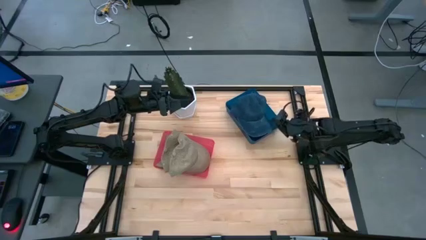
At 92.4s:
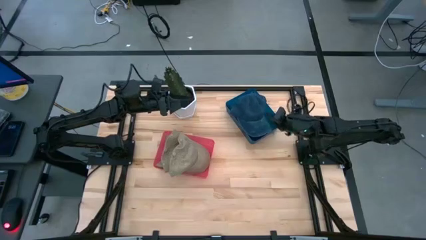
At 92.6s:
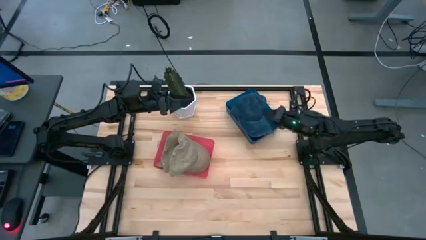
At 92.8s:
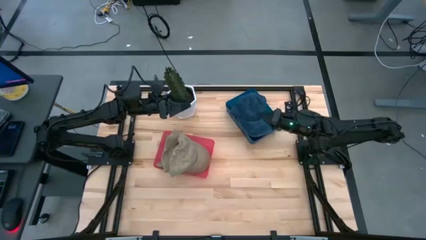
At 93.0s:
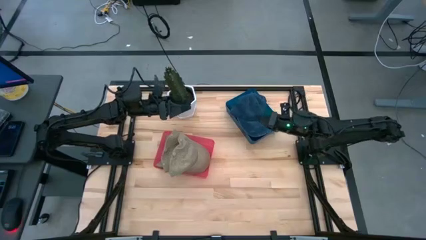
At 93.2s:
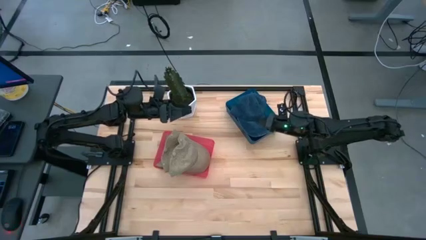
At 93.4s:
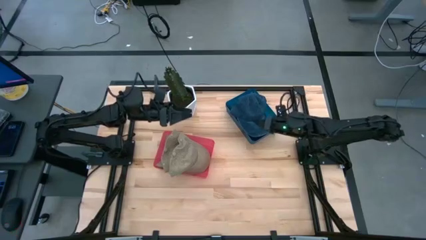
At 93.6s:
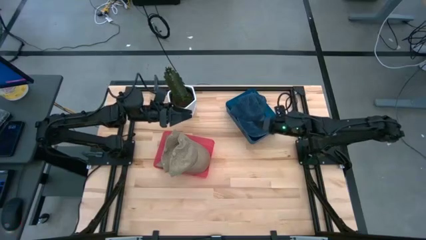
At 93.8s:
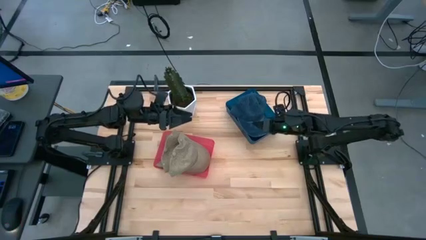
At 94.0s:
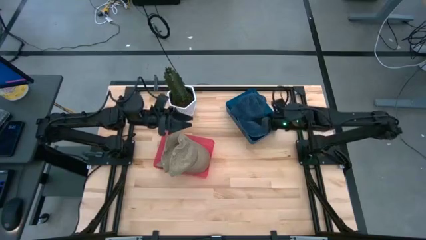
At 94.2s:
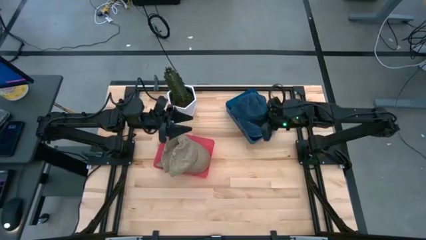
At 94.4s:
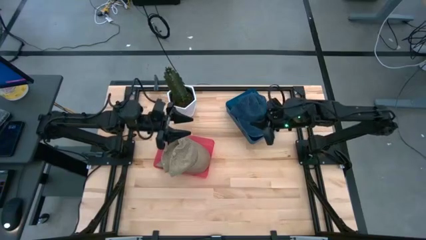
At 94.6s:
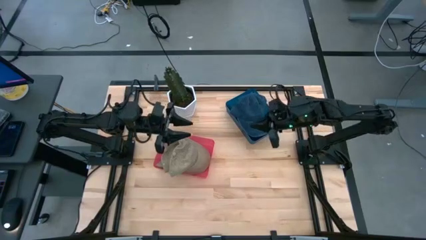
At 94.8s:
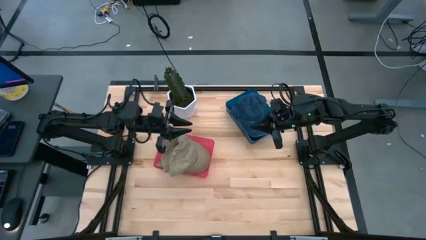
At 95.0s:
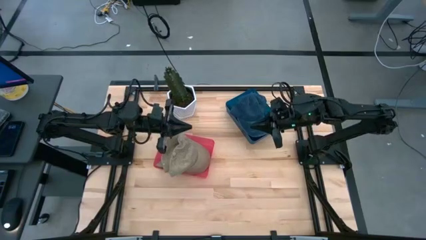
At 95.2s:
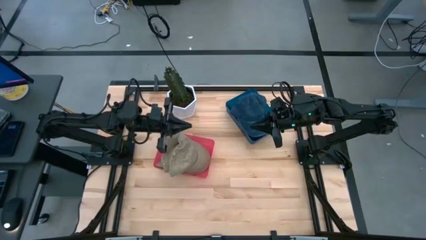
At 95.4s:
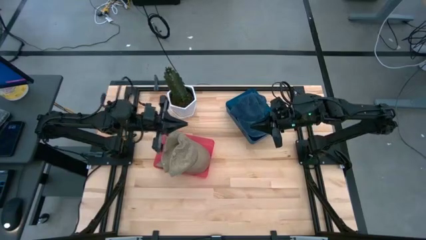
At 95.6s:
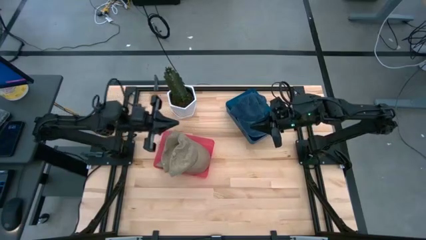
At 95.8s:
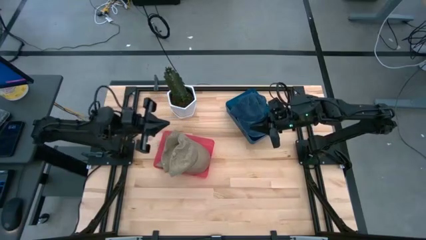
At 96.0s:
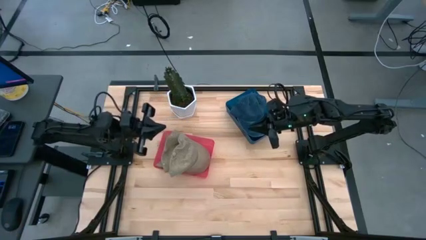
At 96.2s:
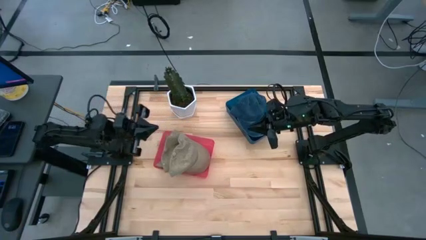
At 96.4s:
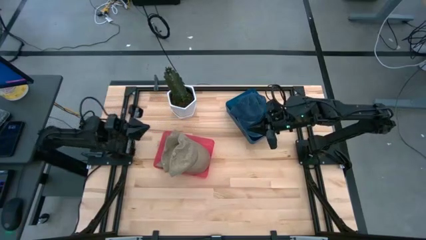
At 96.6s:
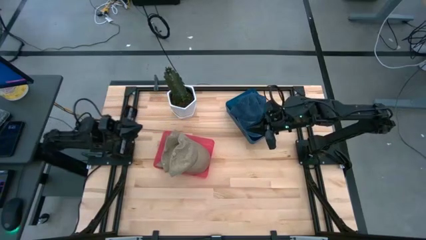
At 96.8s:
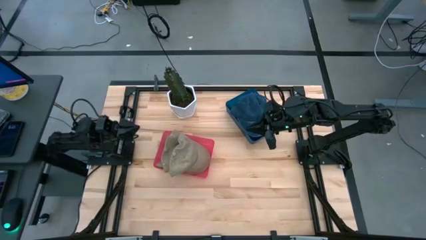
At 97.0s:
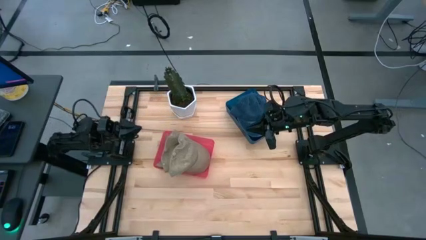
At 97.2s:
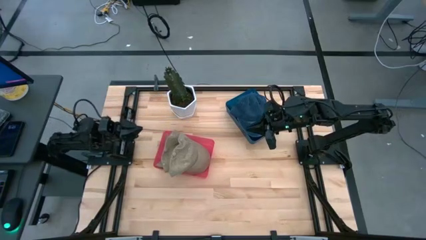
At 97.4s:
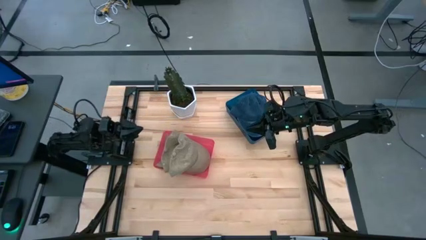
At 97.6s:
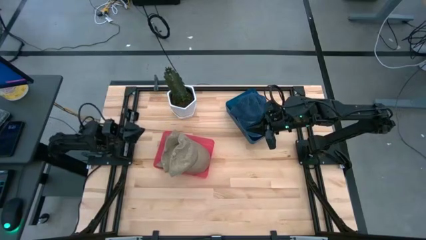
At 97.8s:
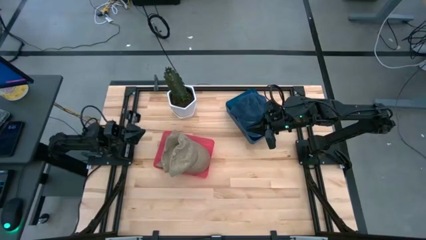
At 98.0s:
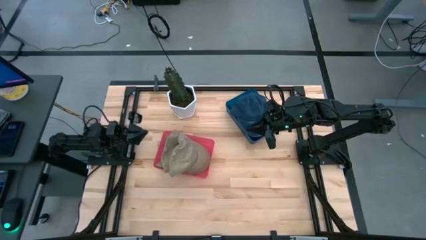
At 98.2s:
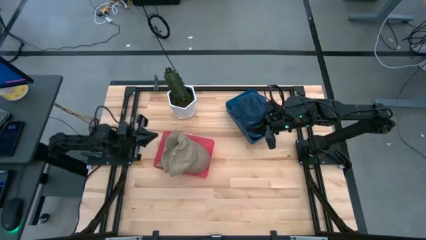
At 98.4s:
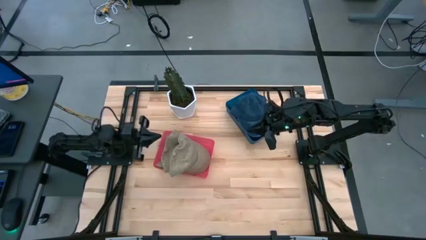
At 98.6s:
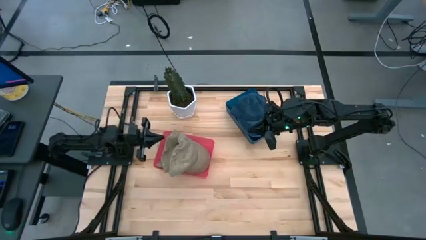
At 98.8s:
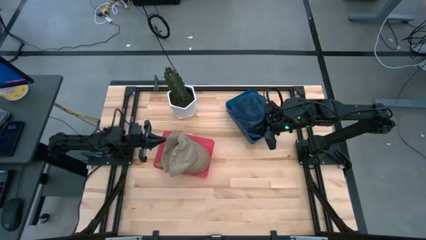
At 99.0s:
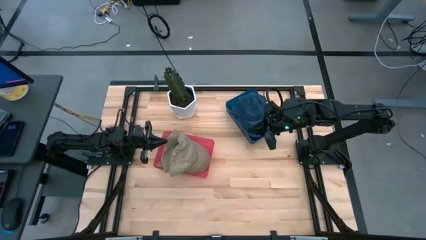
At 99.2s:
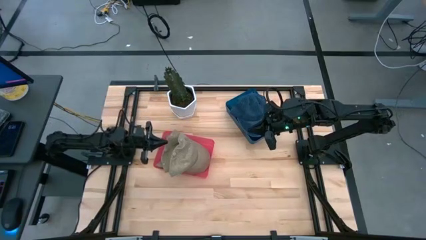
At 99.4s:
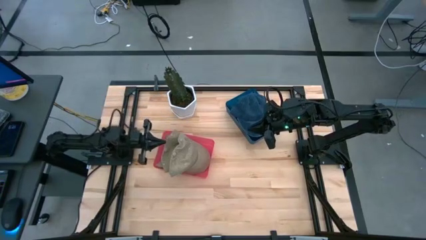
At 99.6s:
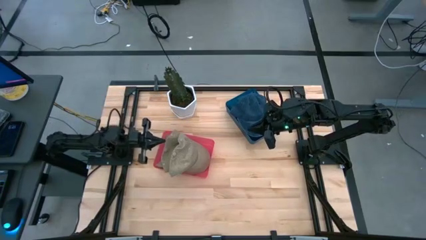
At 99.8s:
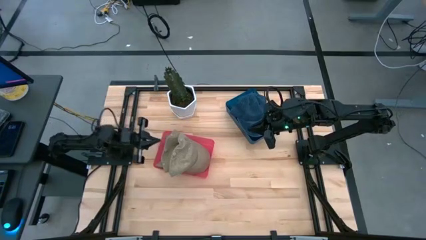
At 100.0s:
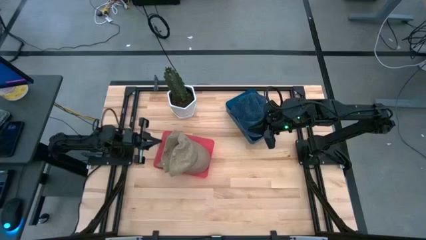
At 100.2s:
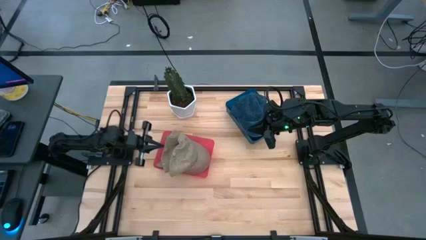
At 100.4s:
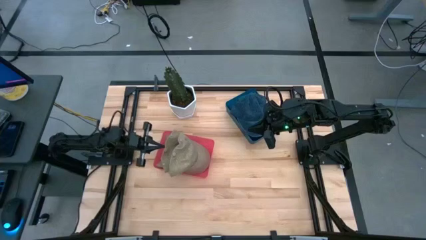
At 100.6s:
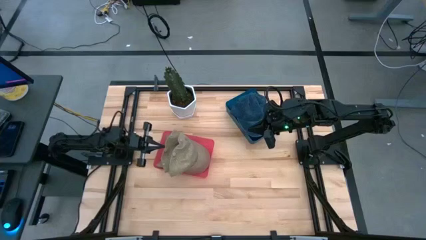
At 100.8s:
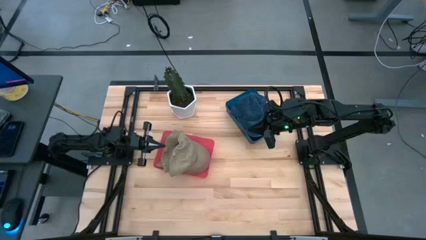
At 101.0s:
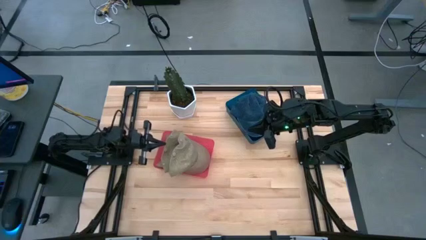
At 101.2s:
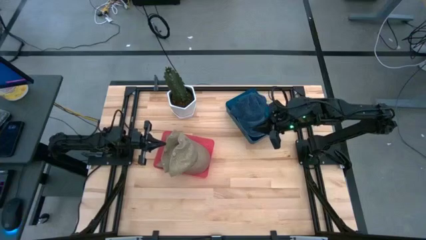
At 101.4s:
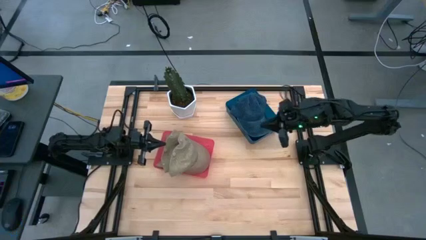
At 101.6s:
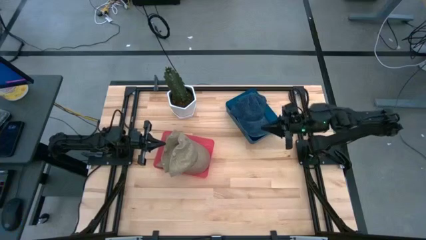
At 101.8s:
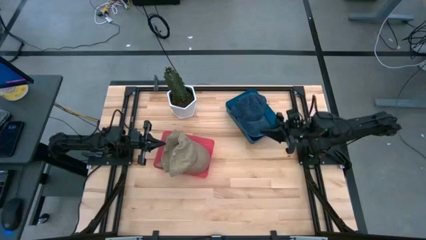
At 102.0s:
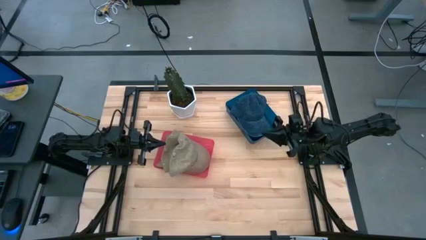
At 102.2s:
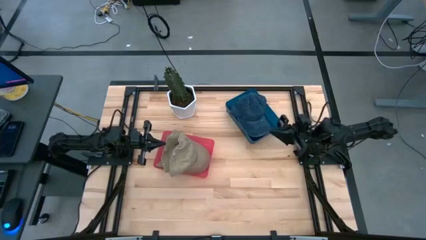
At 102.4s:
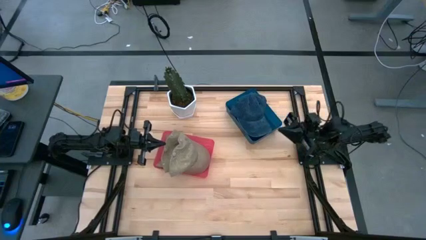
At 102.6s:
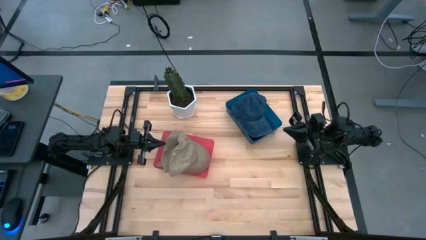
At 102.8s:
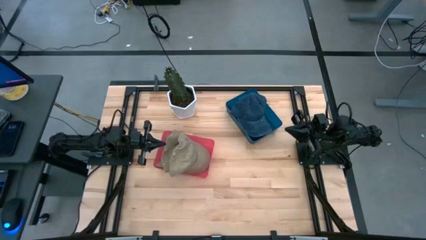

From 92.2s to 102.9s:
Task: Pick & Place hat
Return to Home Position

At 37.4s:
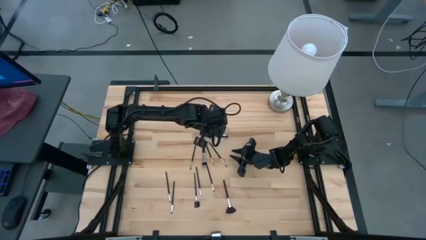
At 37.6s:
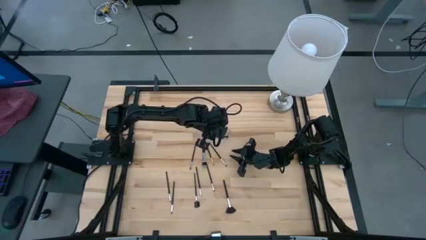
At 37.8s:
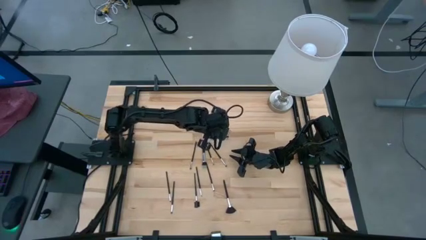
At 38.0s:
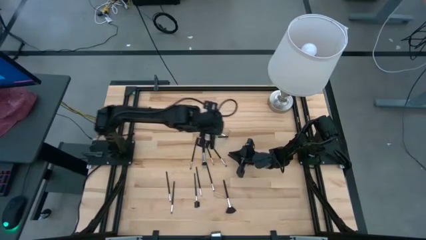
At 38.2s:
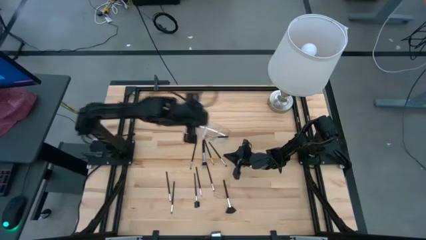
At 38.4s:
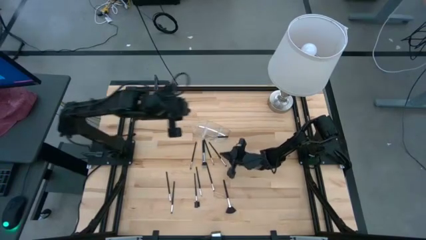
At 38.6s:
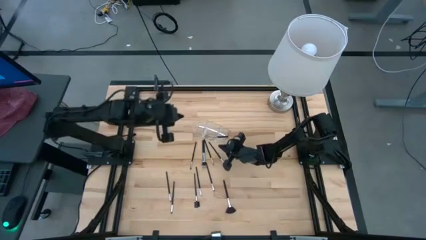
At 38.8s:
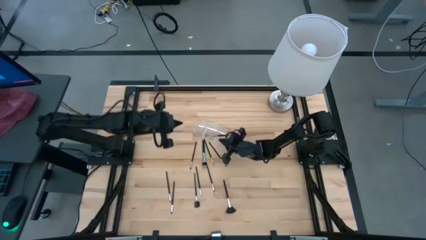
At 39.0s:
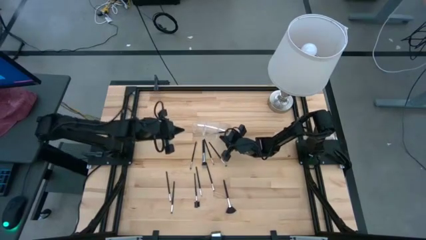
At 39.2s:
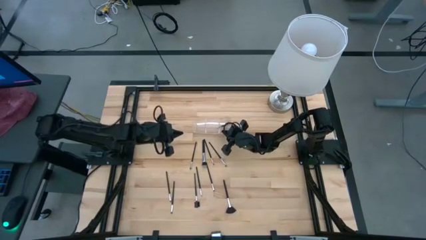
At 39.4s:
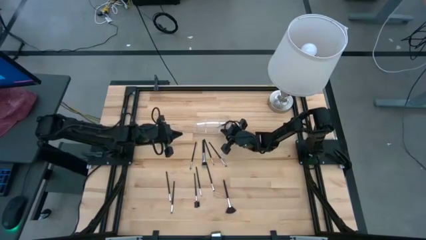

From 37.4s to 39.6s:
Task: Put items in baskets/containers
Adjust the transparent organizer on the table

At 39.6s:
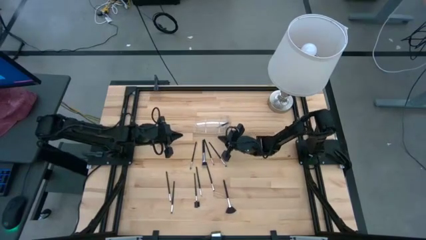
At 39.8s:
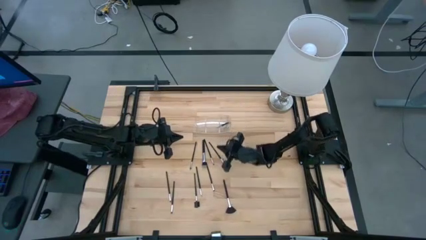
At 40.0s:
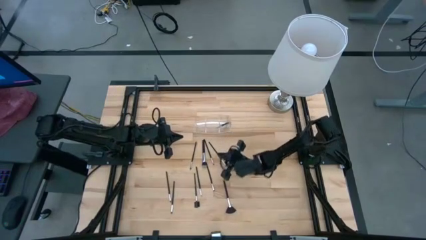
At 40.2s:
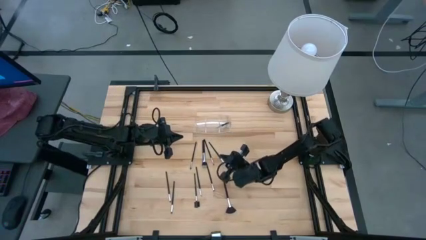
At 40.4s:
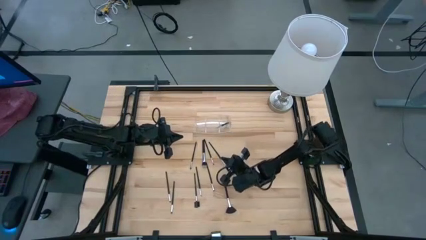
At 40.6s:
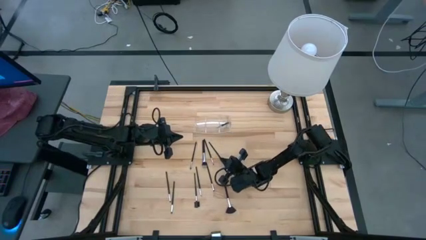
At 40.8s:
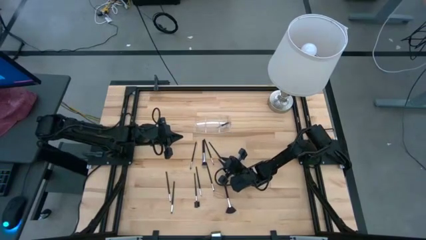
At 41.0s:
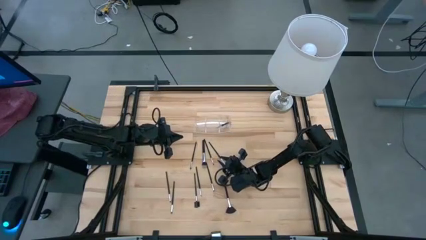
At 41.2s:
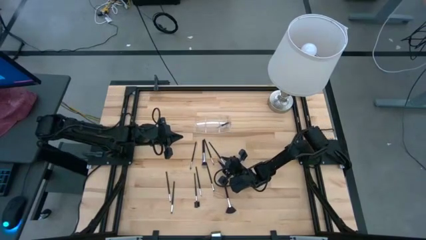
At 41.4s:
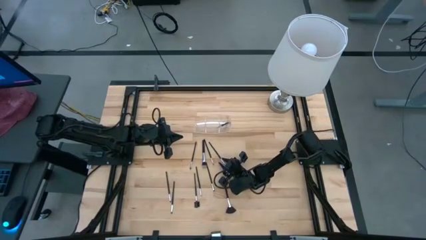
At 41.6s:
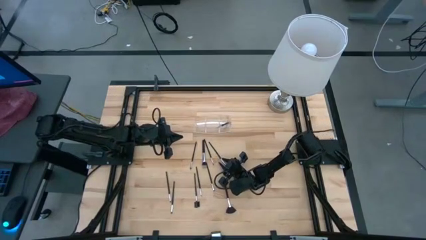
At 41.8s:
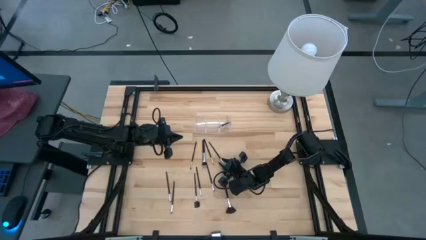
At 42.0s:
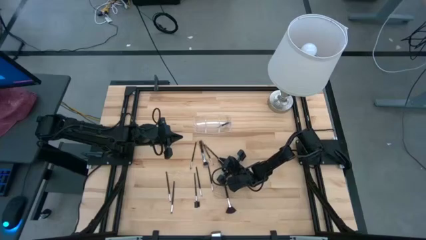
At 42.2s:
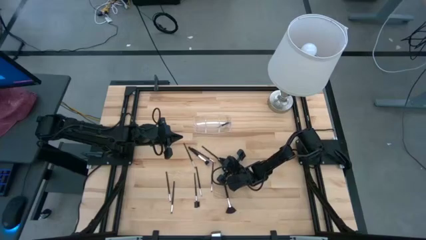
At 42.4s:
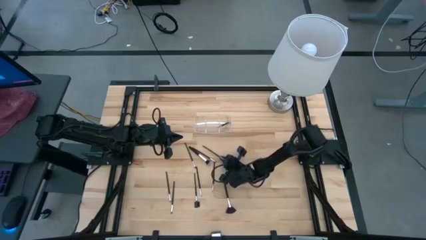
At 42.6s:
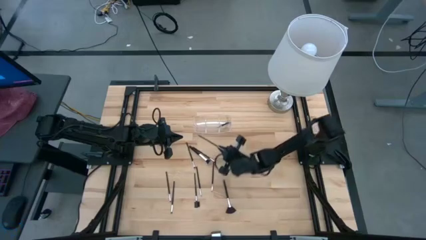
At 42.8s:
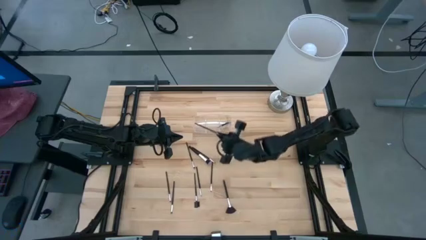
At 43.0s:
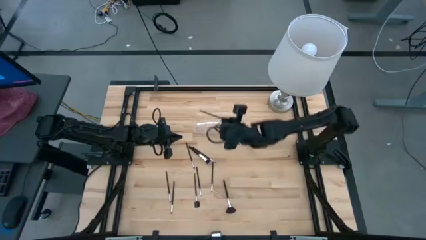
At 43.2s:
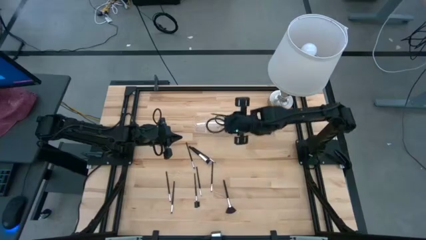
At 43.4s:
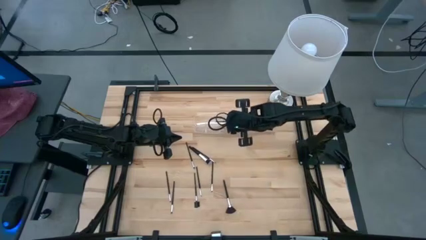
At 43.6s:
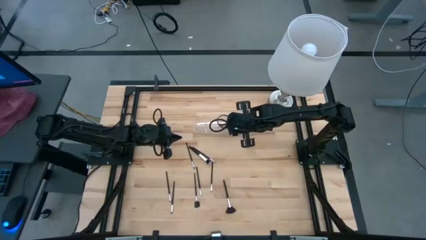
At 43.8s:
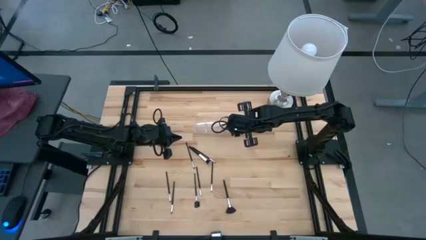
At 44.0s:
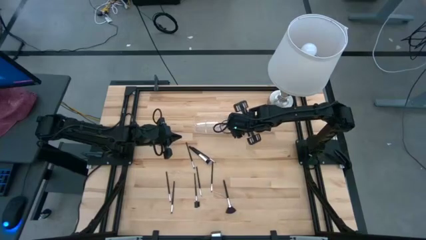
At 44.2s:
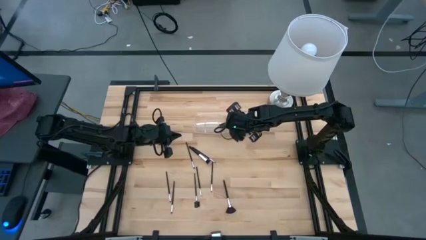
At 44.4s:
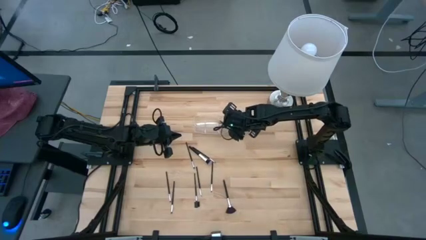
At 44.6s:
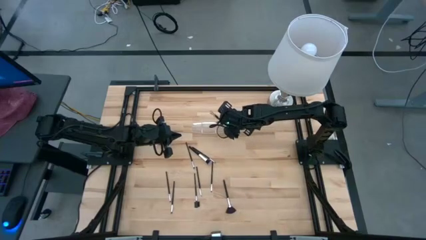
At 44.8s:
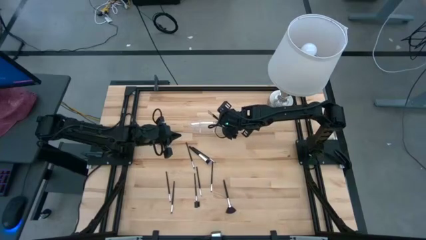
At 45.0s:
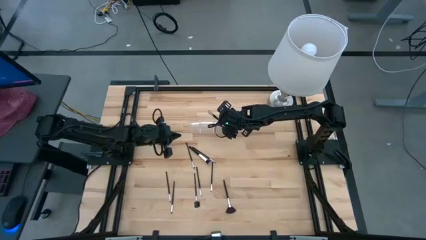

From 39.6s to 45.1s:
Put the black eyeshadow brush into the transparent organizer
